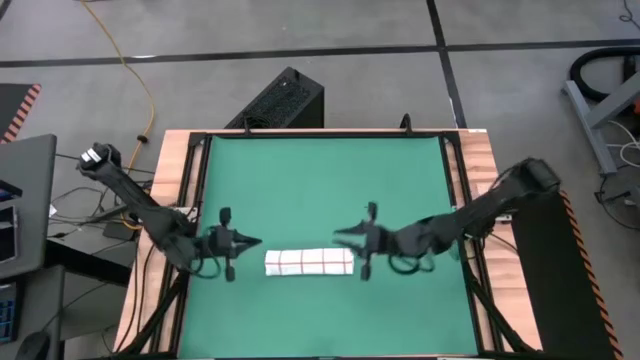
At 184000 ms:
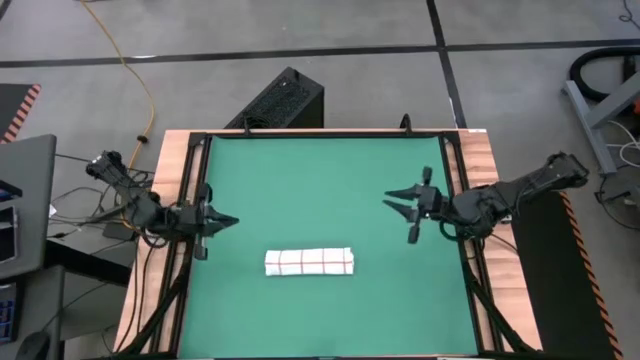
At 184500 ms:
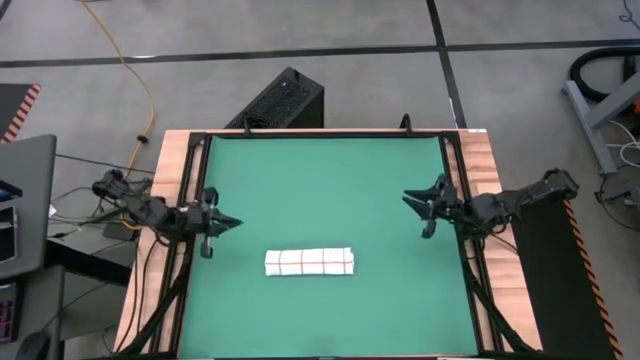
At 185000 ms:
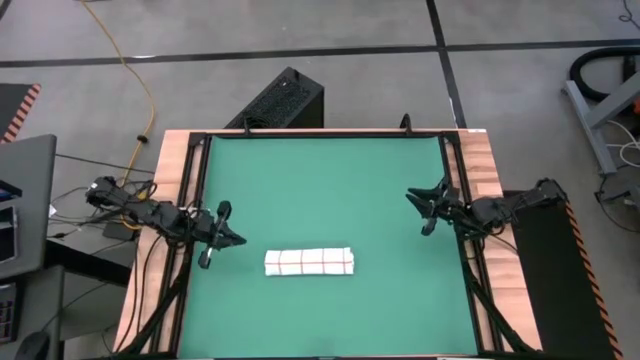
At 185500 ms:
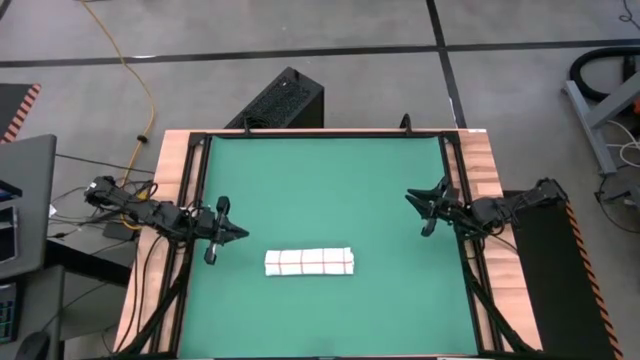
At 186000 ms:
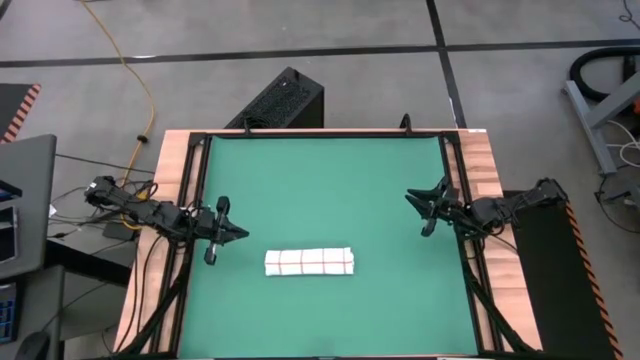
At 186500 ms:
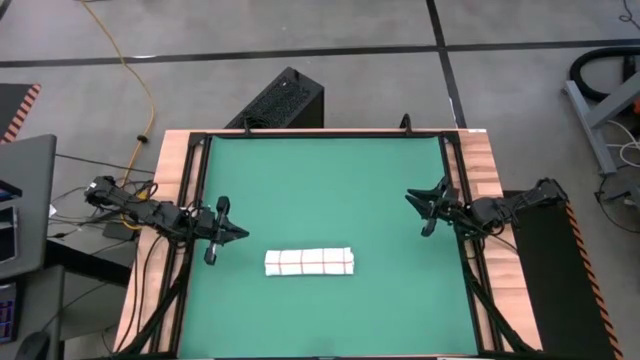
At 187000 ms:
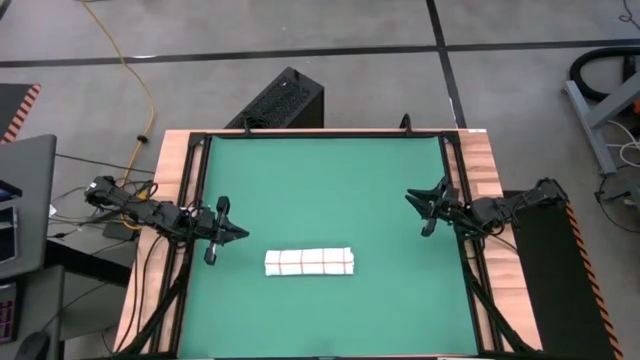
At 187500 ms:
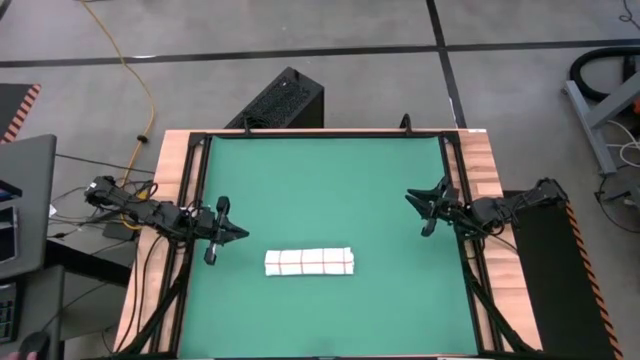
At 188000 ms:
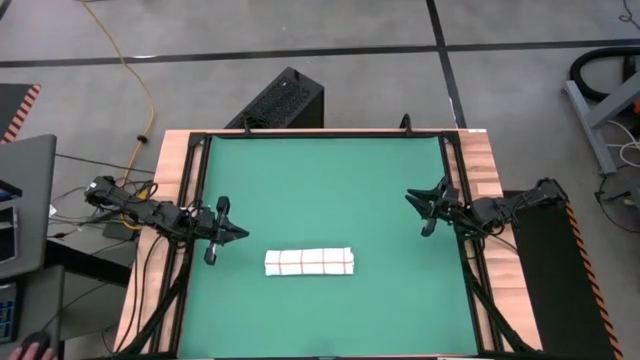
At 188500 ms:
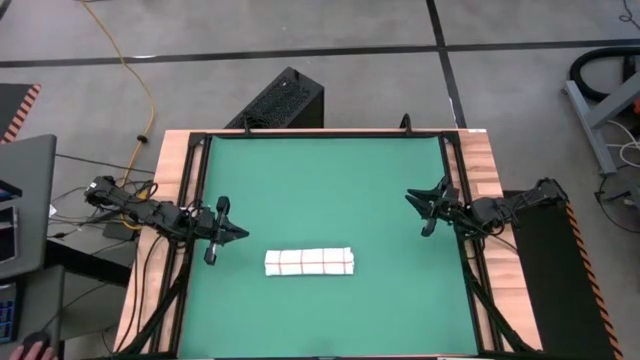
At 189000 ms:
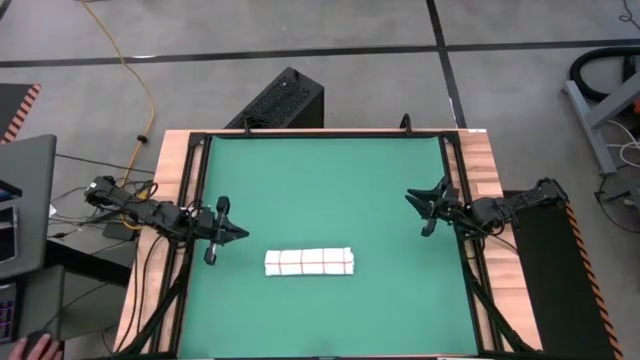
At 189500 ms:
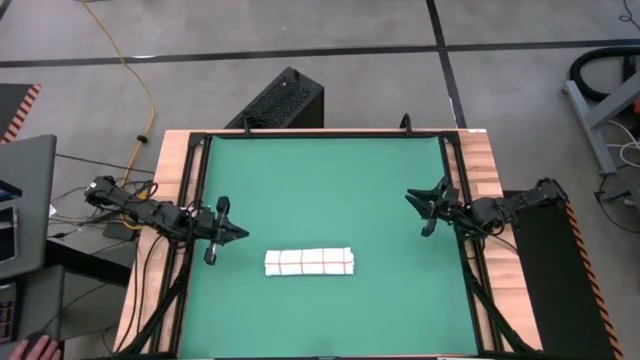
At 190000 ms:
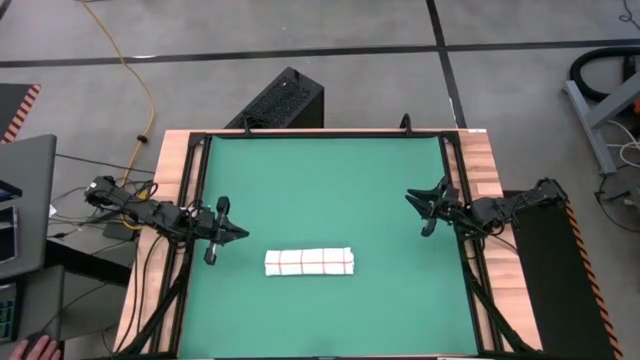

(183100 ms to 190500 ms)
Task: Roll towel
Return to Home Position

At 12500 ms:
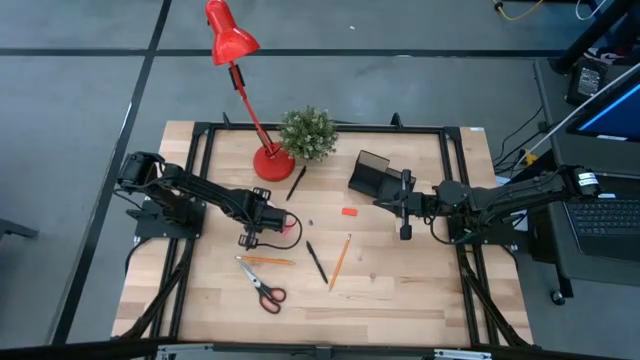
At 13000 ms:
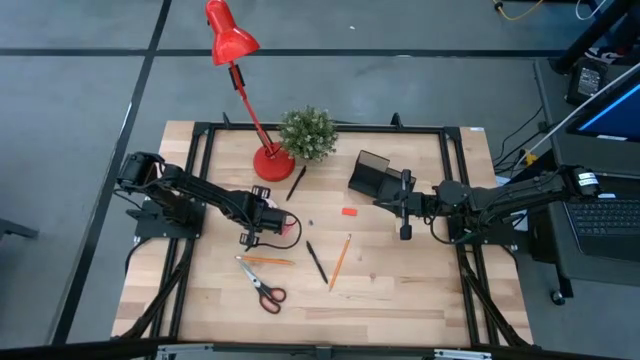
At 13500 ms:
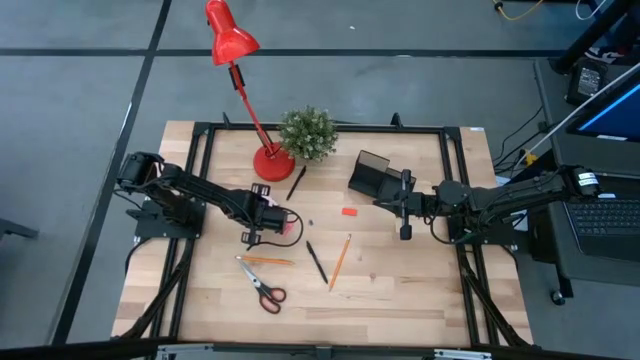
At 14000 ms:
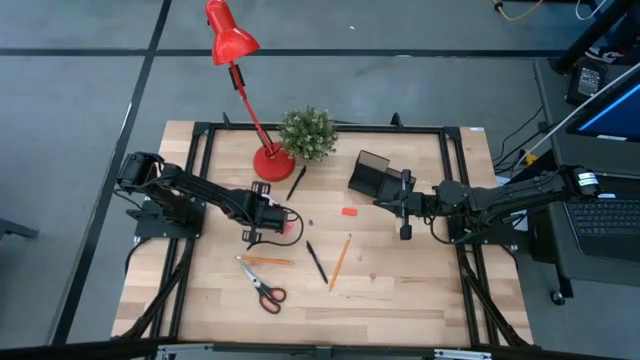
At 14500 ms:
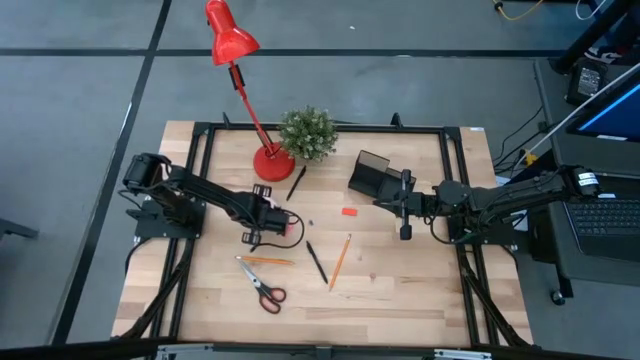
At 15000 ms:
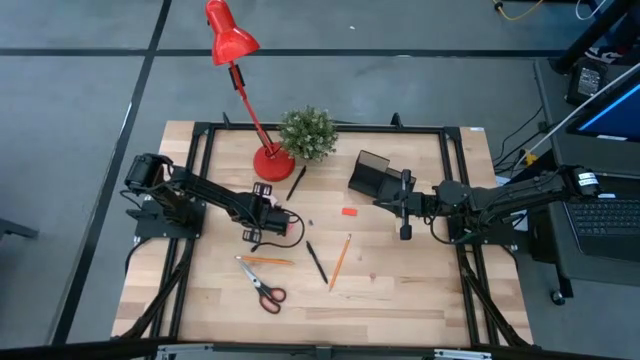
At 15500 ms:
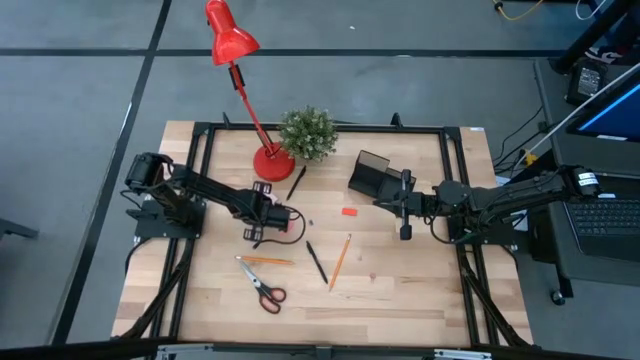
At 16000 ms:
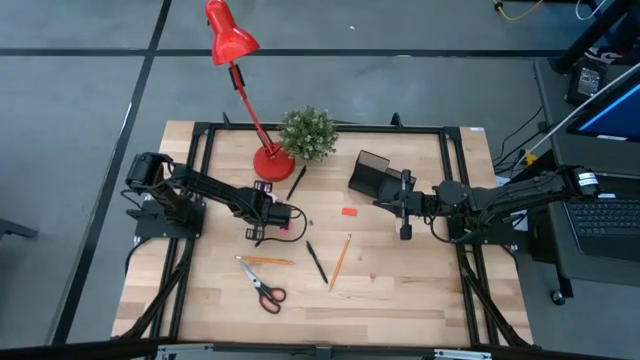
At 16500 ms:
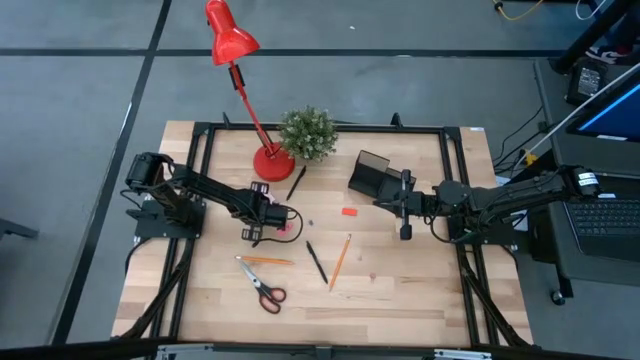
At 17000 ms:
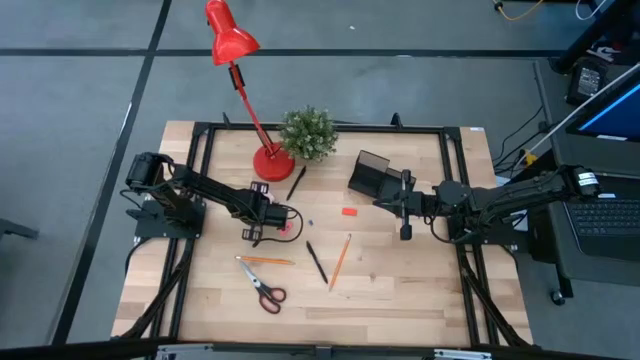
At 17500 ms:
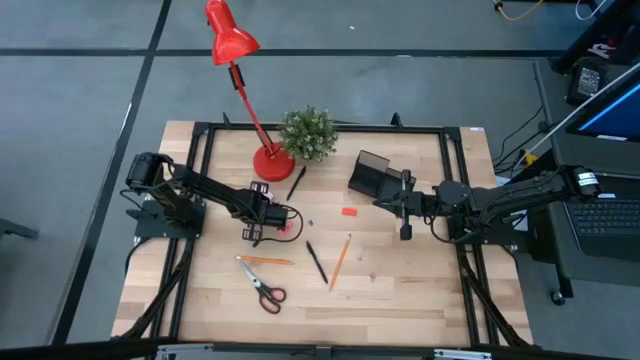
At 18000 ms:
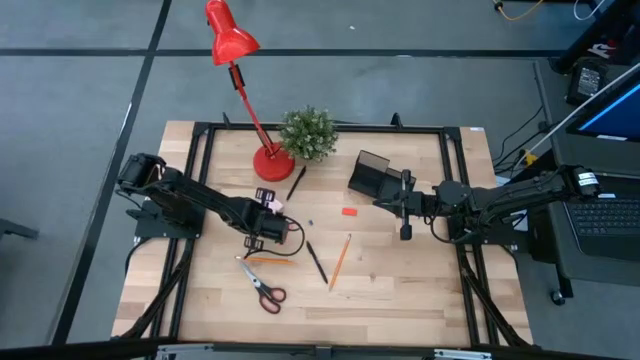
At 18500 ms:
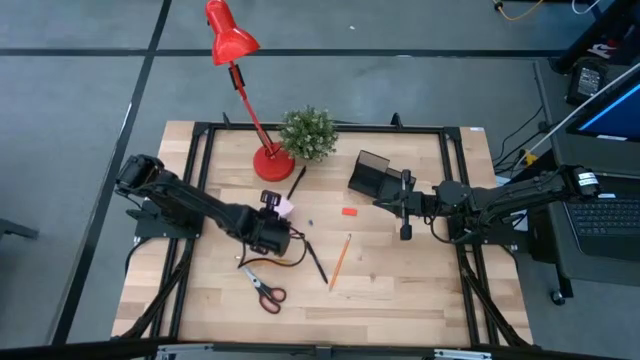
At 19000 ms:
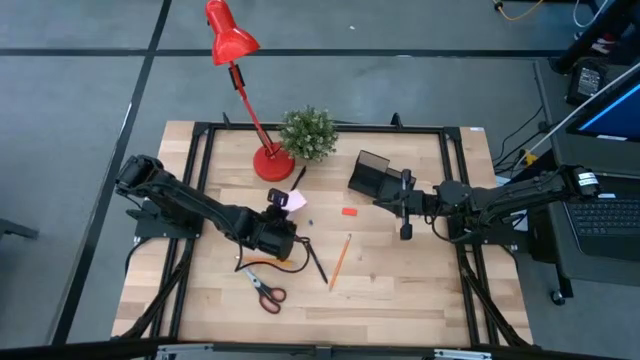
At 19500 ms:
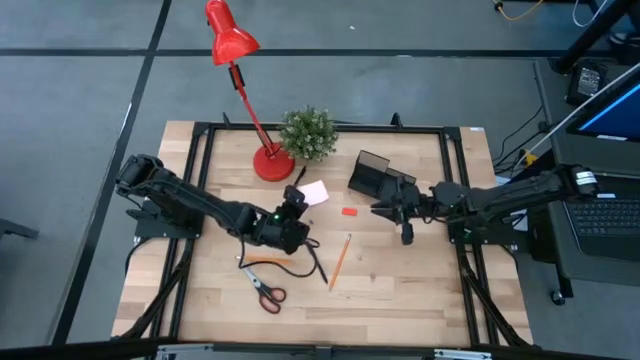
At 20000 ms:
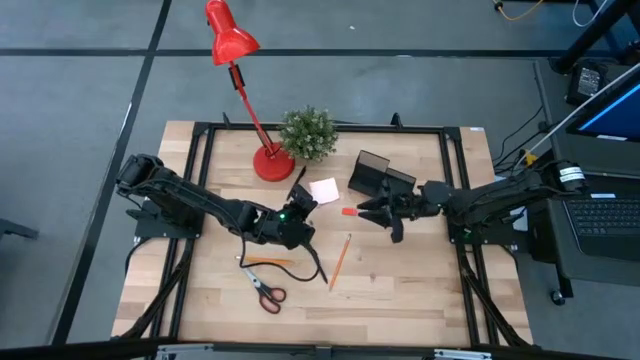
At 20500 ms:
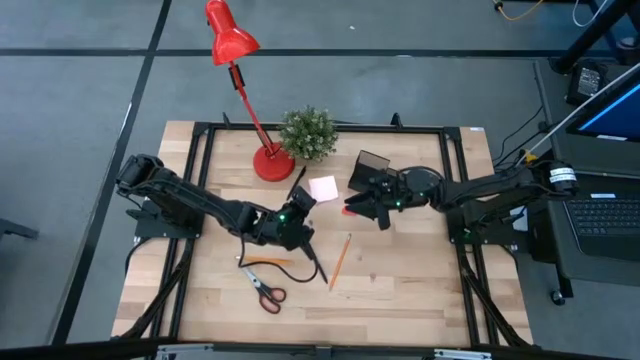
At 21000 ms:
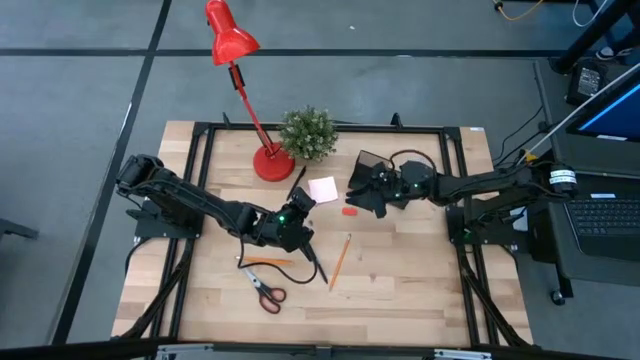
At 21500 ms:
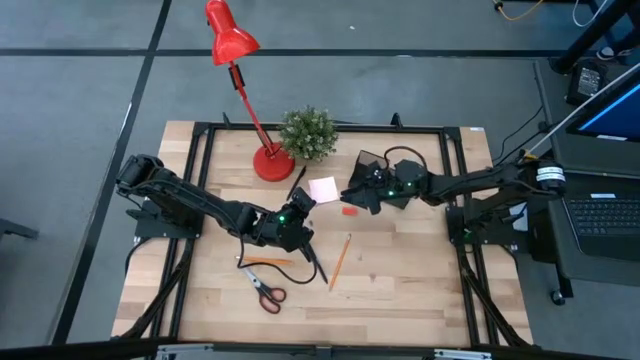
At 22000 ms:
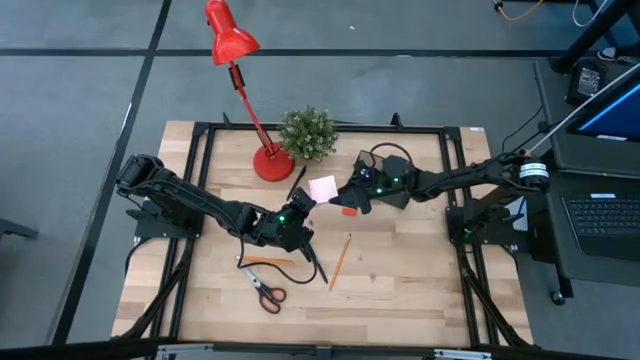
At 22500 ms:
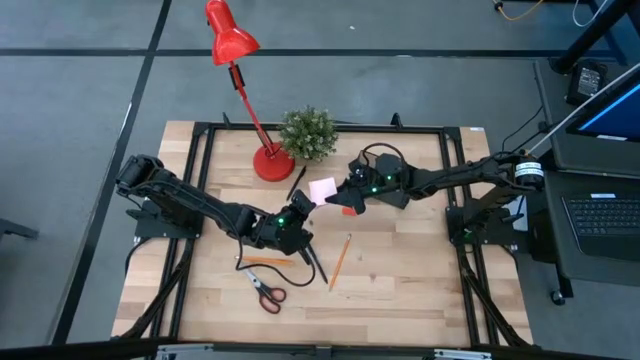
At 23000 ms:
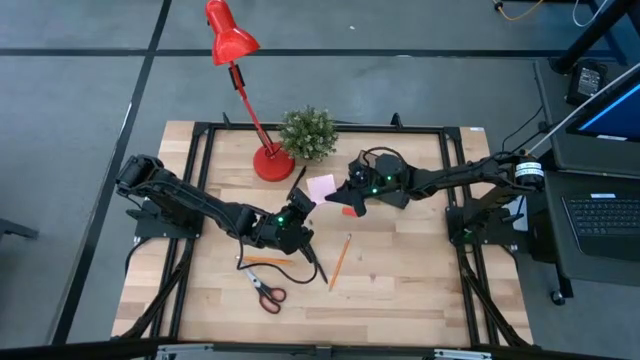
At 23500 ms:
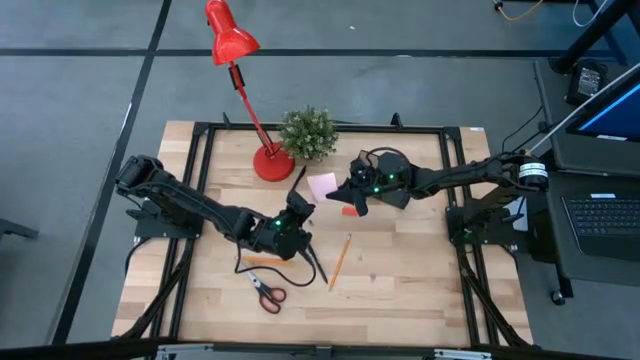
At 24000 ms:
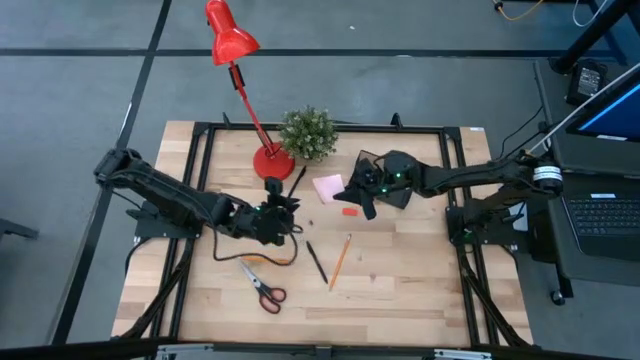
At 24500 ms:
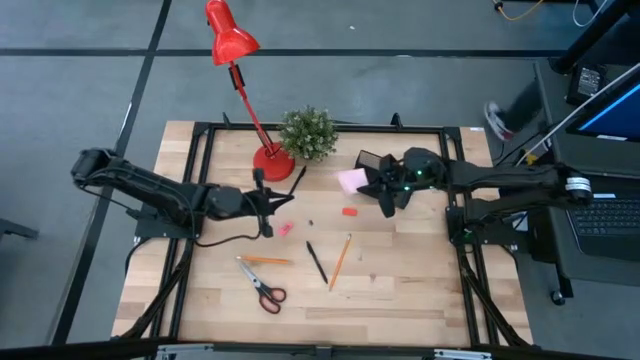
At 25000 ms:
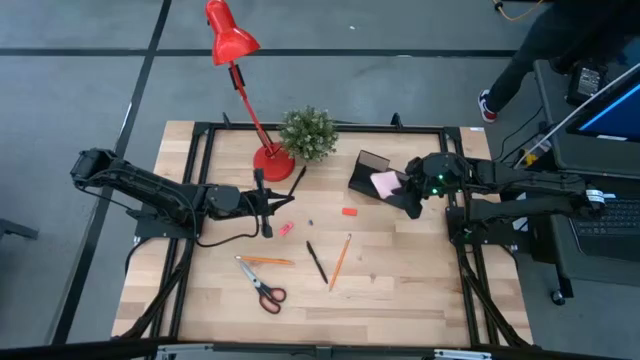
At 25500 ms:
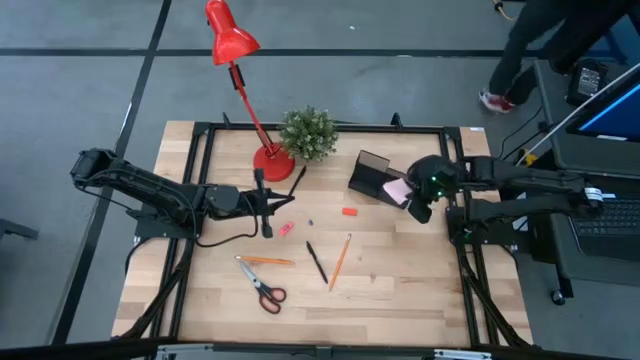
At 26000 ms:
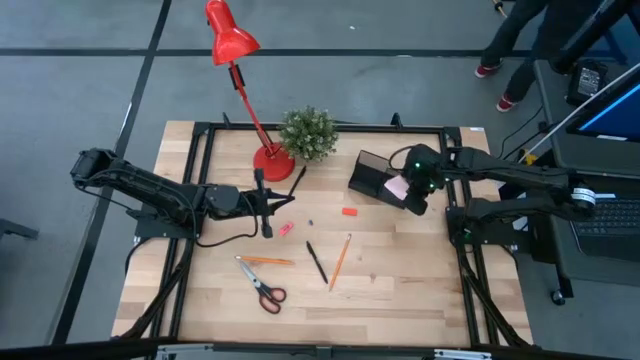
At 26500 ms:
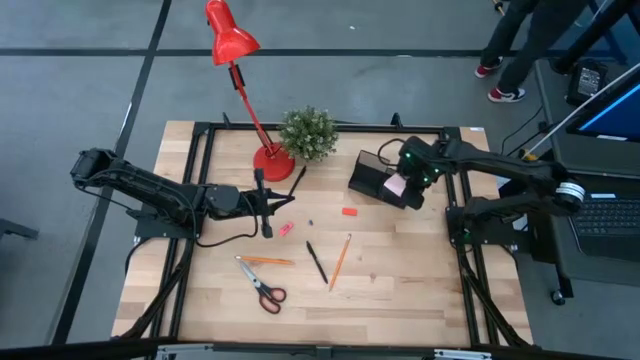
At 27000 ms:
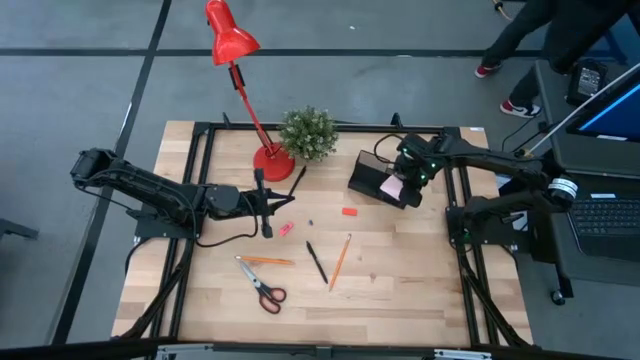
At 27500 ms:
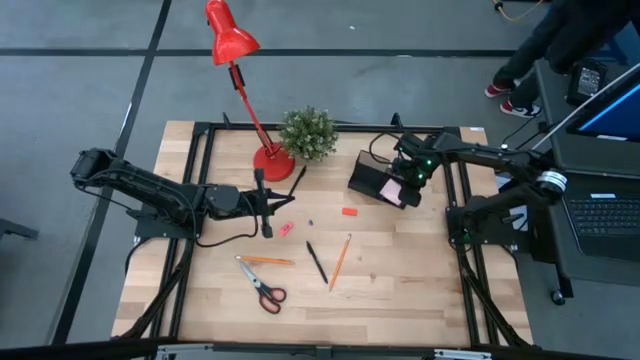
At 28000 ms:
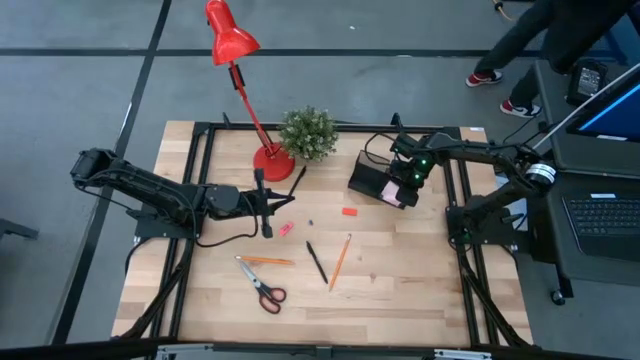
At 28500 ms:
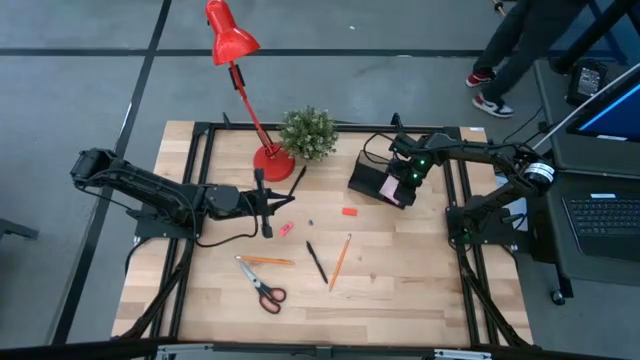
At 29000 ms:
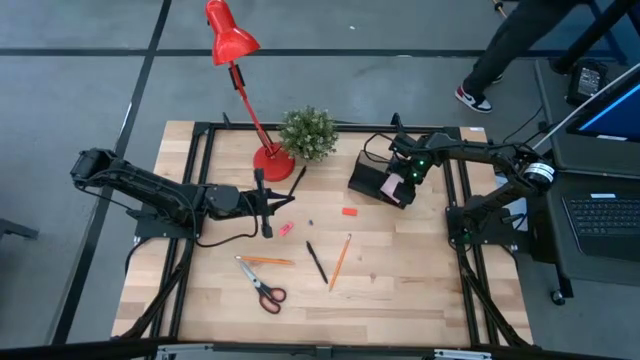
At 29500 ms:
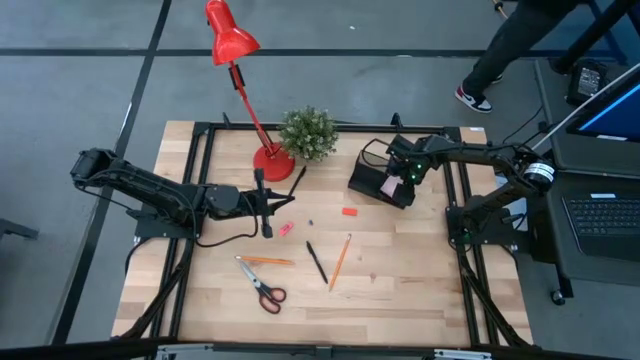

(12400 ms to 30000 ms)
Task: Pick and place office supplies into organizer
Put the pink sticky notes into the black desk organizer
